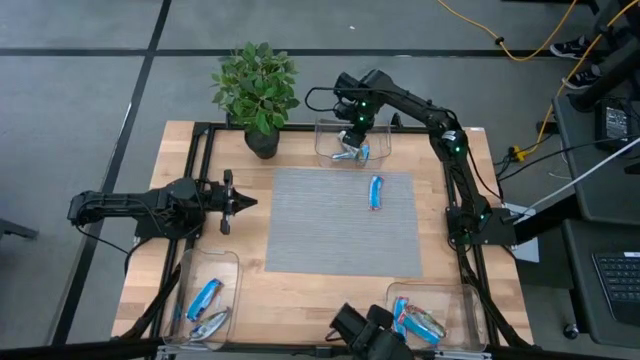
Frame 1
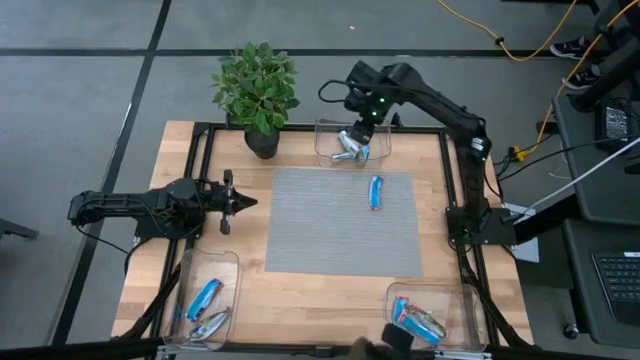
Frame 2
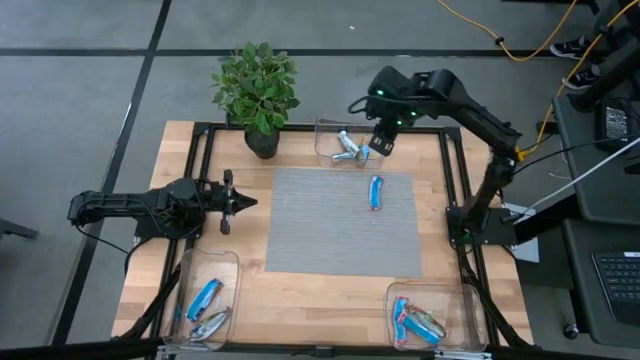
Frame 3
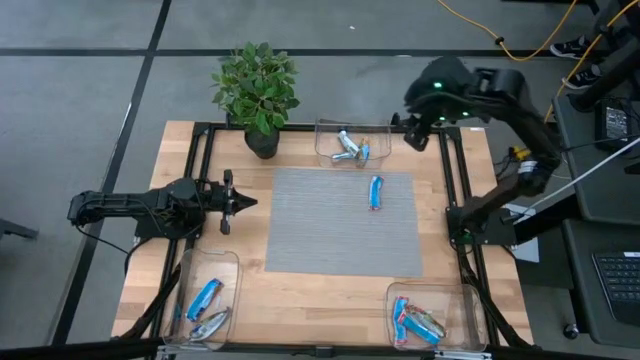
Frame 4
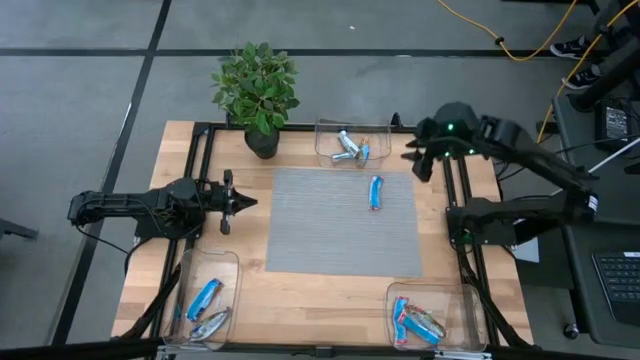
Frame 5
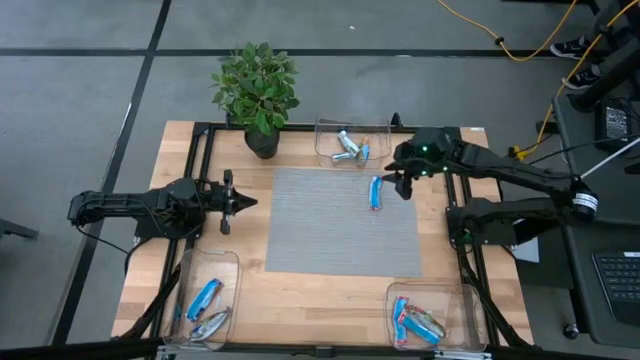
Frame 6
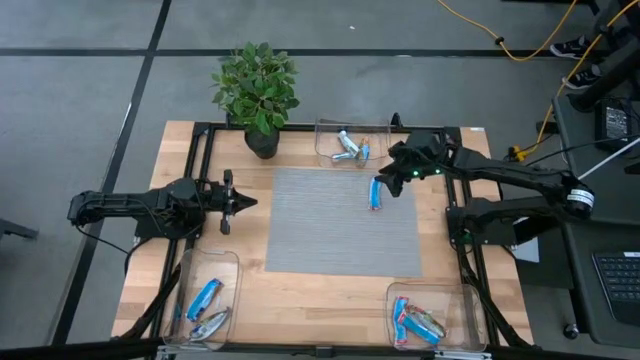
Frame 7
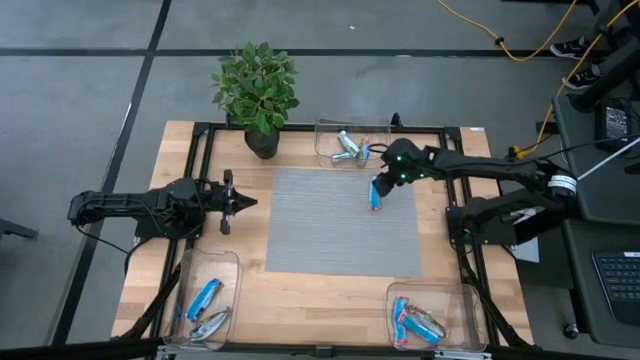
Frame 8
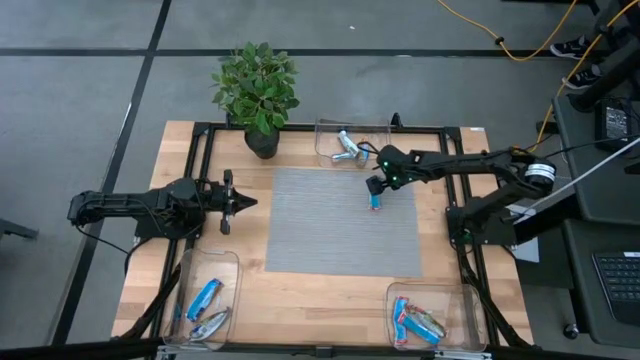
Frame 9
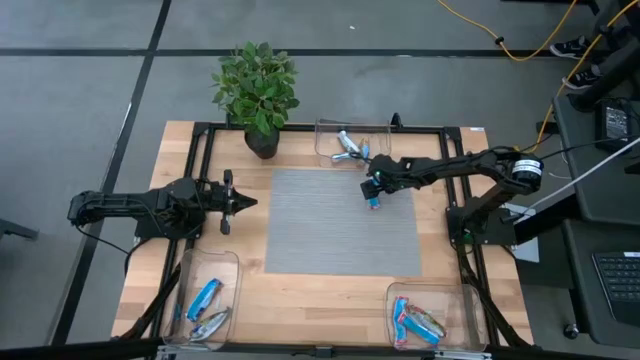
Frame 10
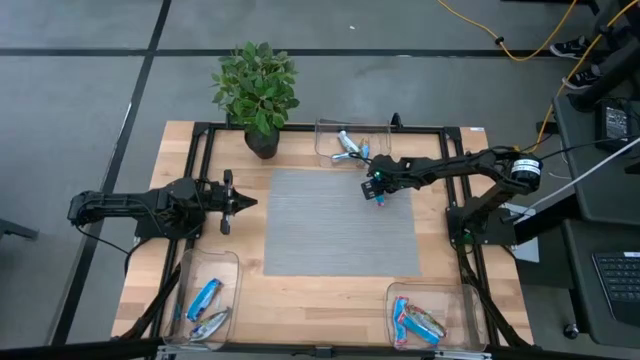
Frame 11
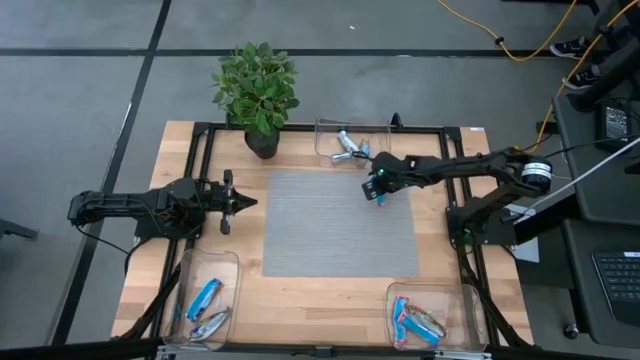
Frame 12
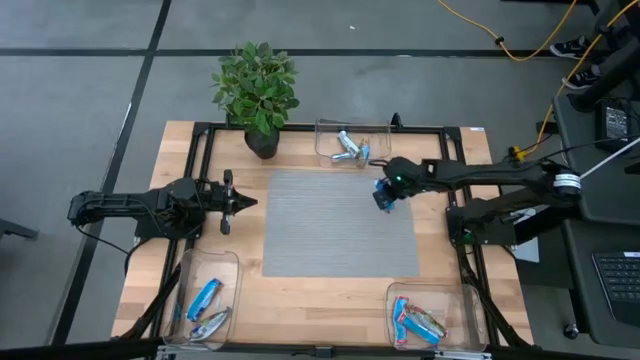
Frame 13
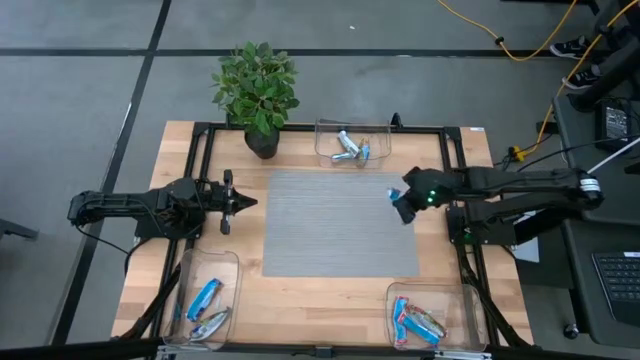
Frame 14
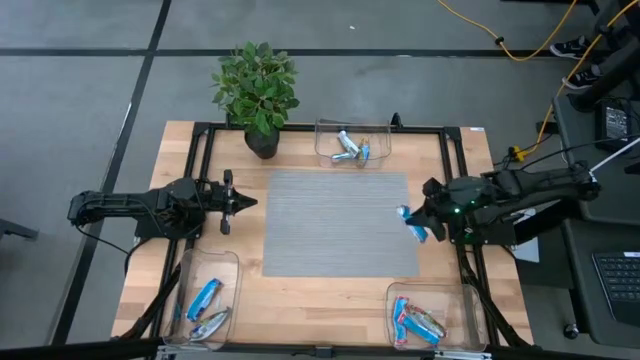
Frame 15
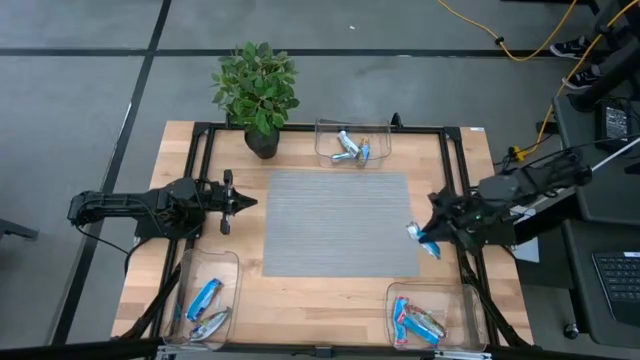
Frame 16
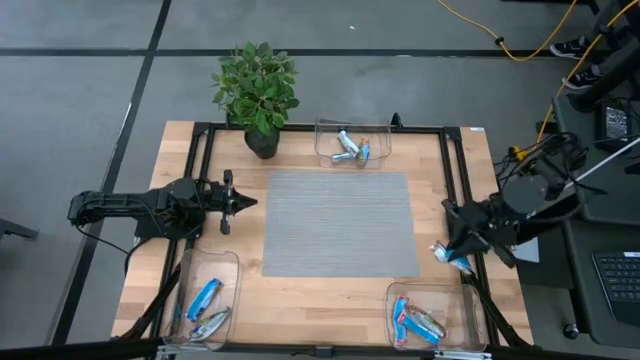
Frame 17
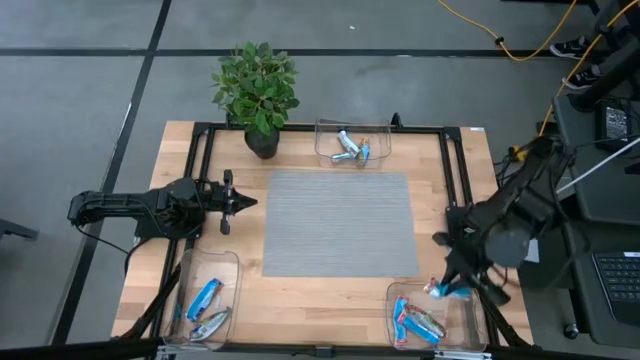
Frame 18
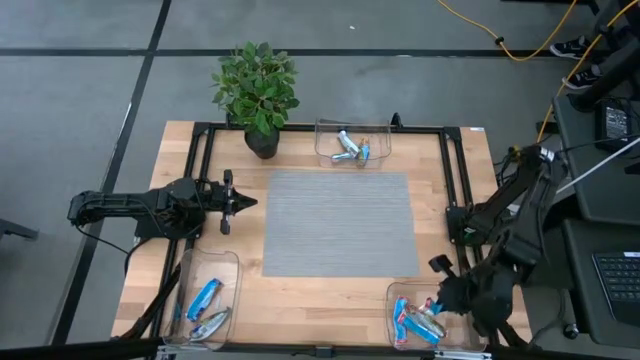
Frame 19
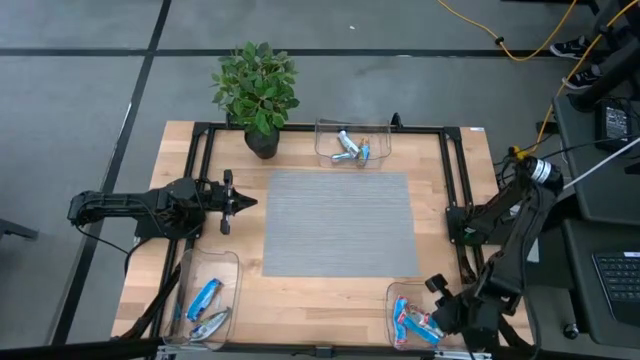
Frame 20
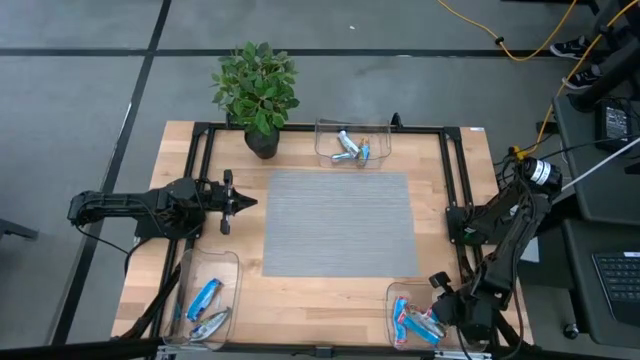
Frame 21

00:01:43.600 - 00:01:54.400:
Task: Pick and place Granola Bars by type
Put the red granola bar into the bottom right transparent bin

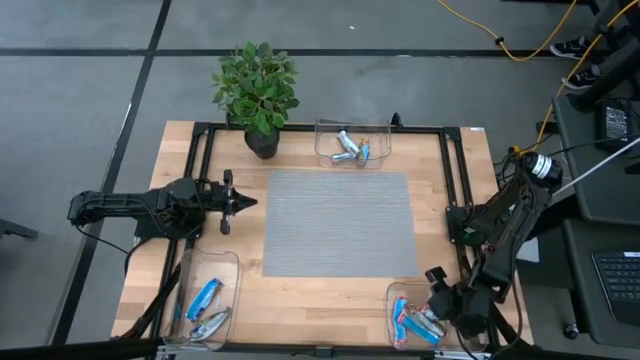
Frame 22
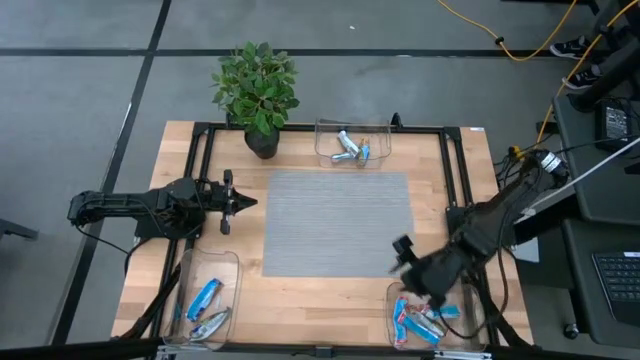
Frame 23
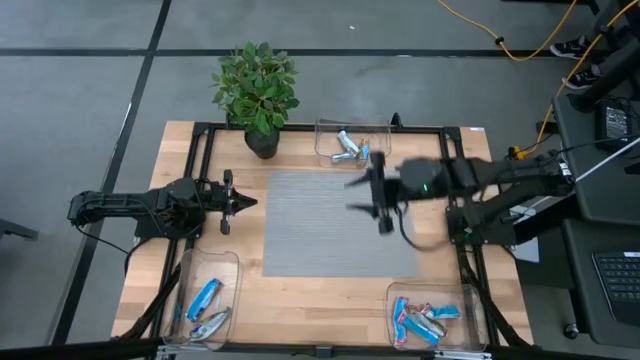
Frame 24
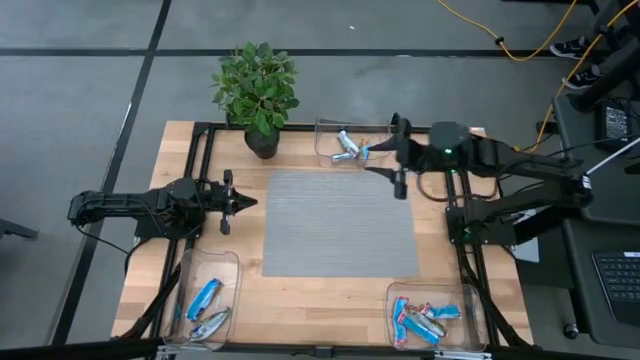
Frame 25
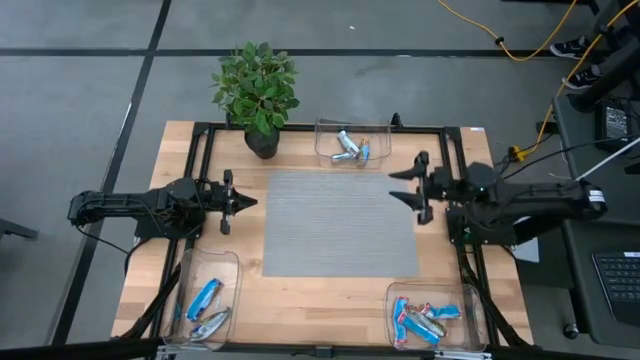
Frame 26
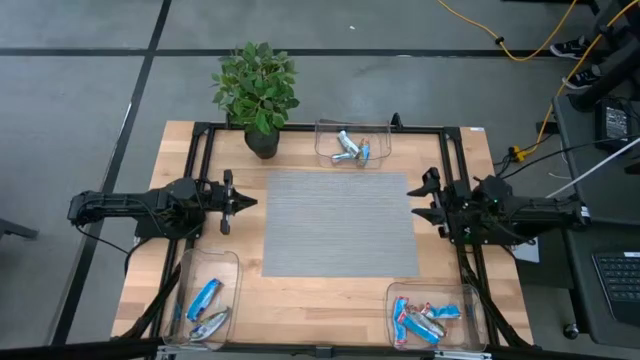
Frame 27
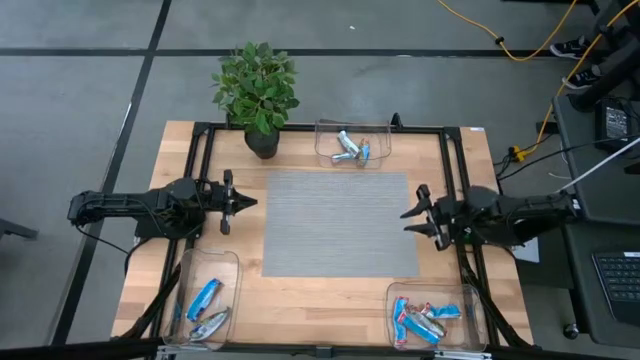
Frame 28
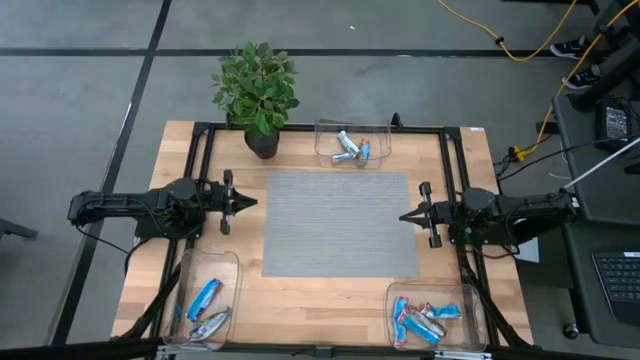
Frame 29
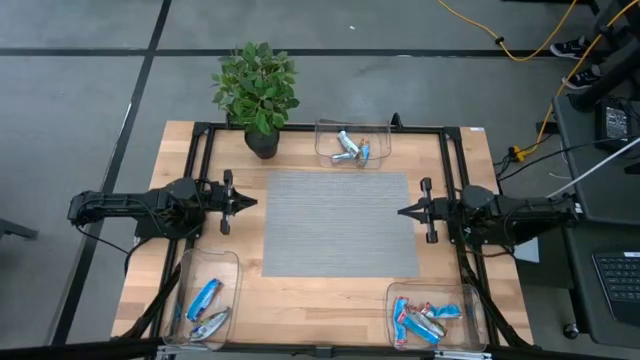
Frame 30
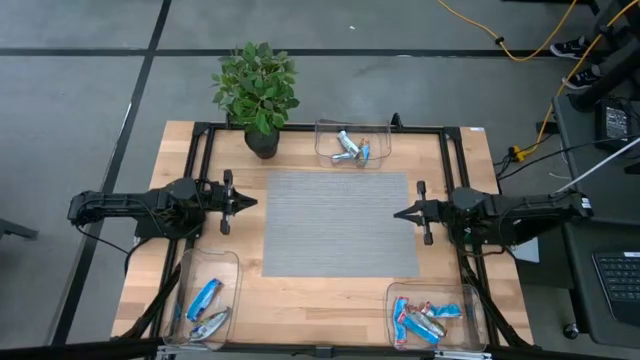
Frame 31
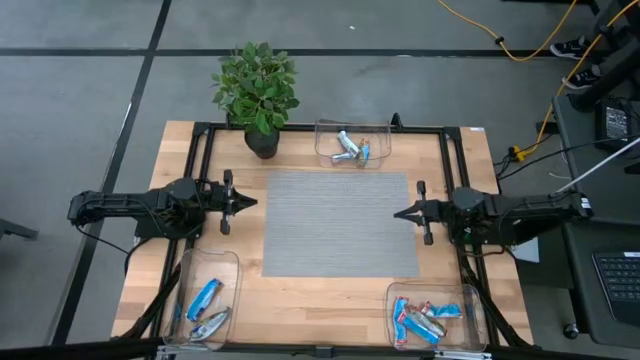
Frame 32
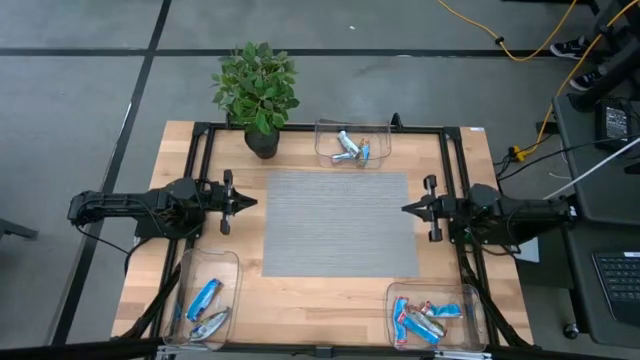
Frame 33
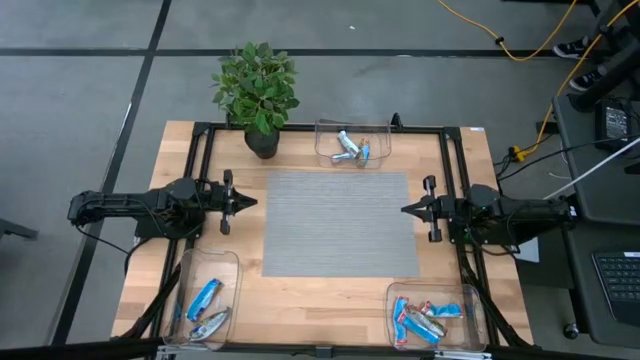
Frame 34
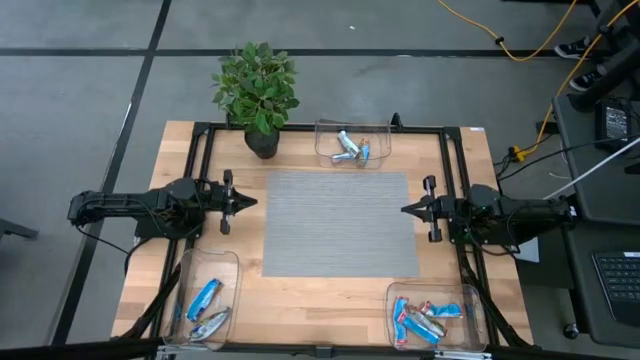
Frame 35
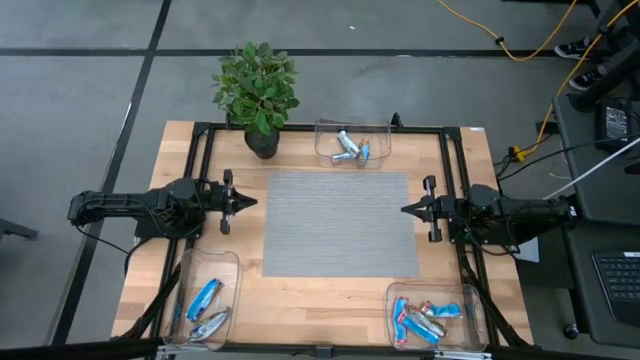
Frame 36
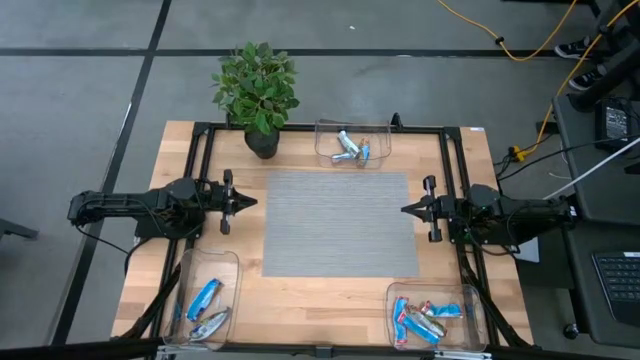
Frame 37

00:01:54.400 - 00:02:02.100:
Return to Home Position
